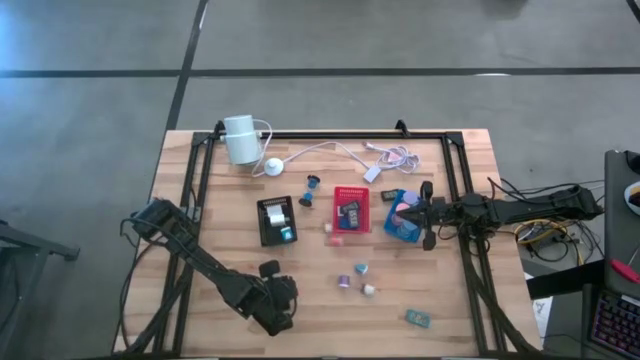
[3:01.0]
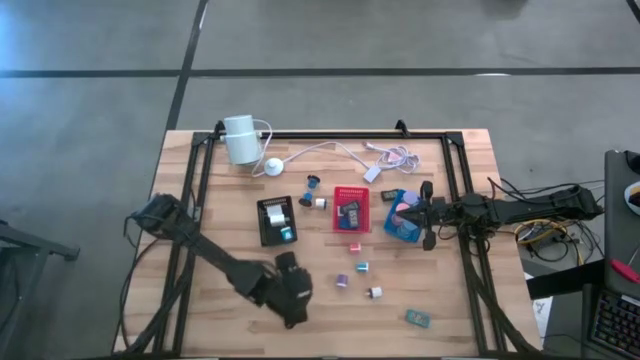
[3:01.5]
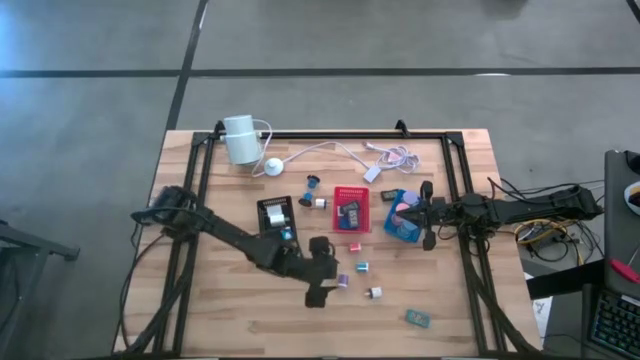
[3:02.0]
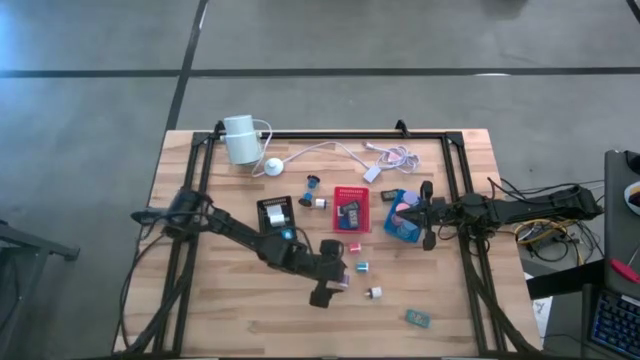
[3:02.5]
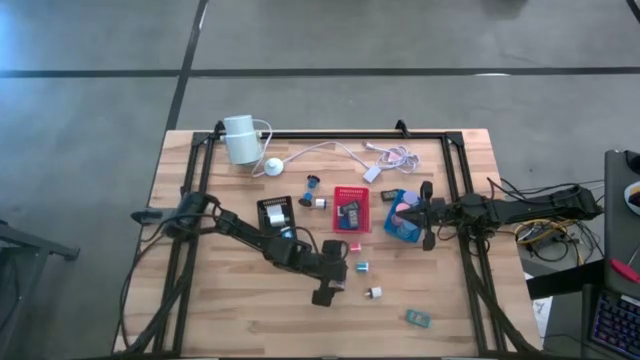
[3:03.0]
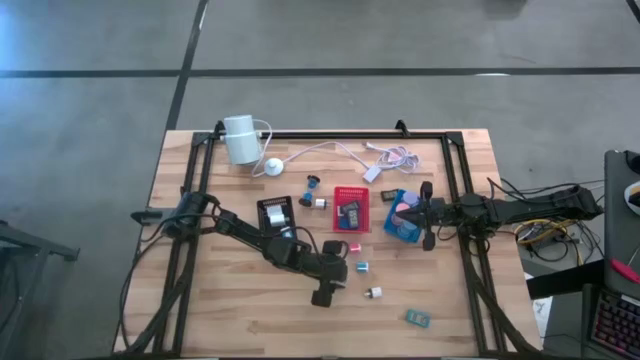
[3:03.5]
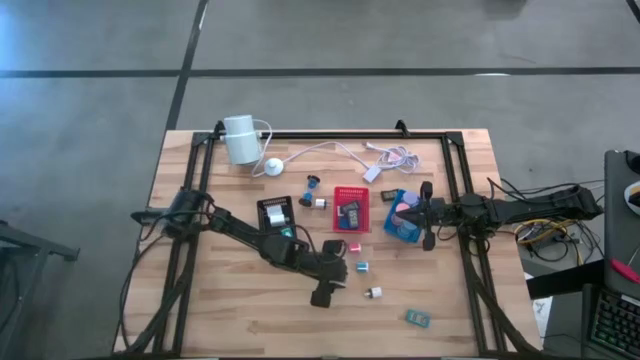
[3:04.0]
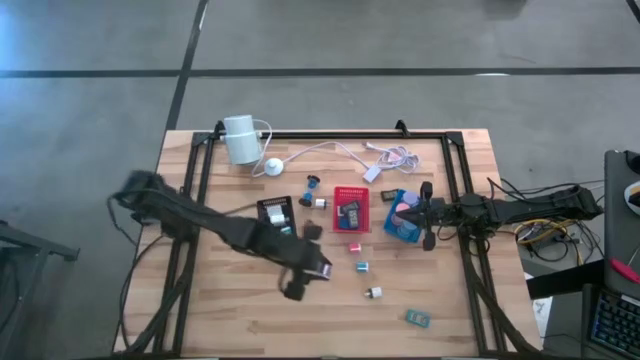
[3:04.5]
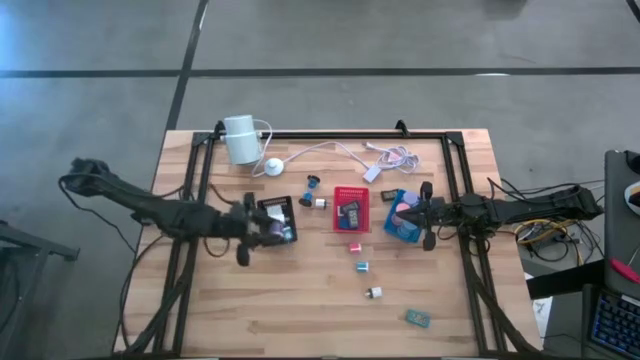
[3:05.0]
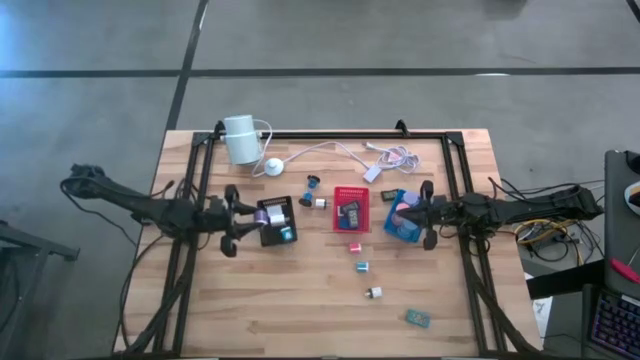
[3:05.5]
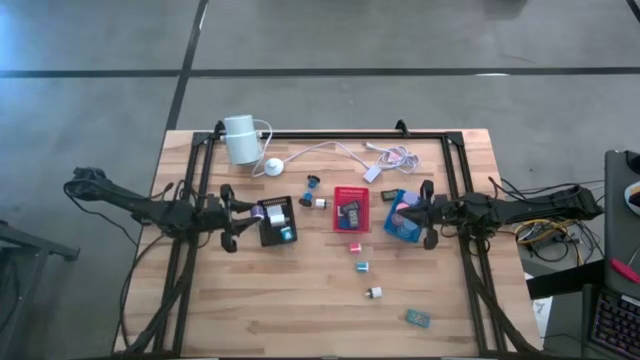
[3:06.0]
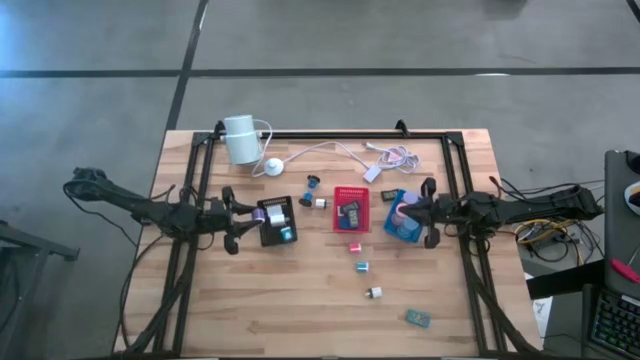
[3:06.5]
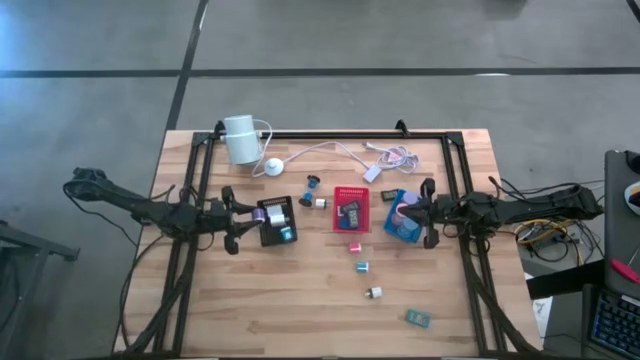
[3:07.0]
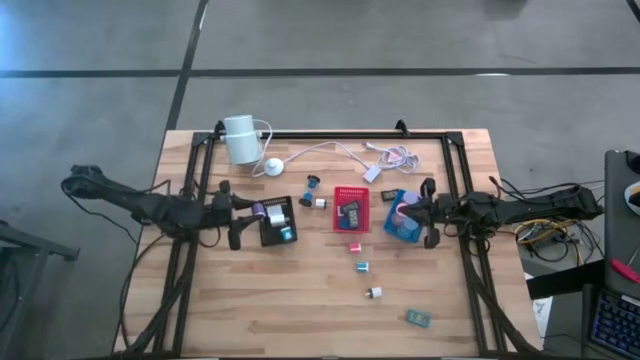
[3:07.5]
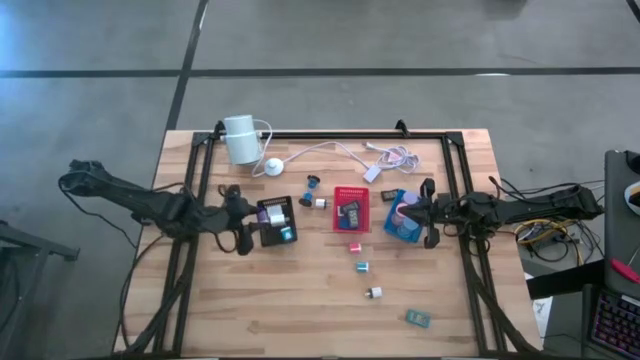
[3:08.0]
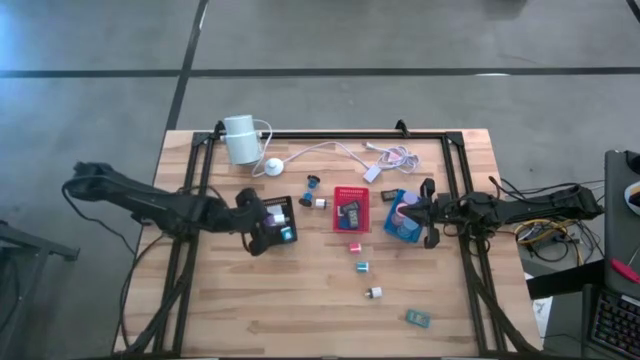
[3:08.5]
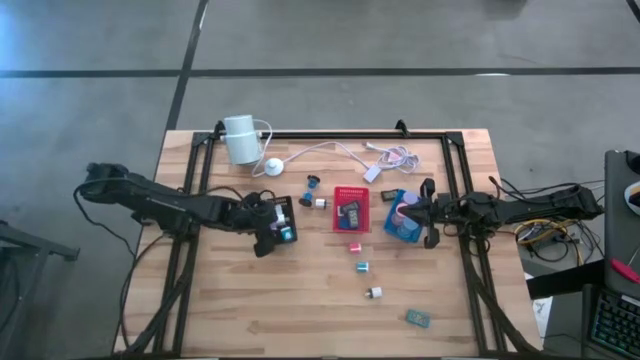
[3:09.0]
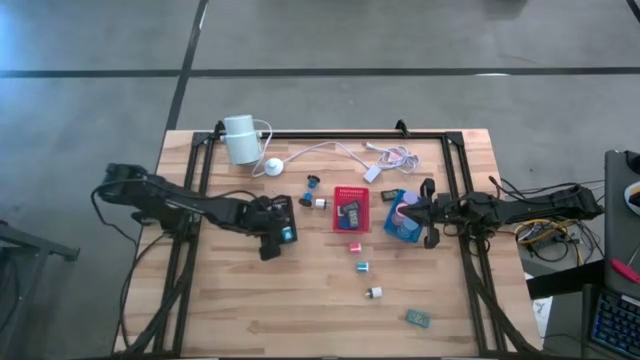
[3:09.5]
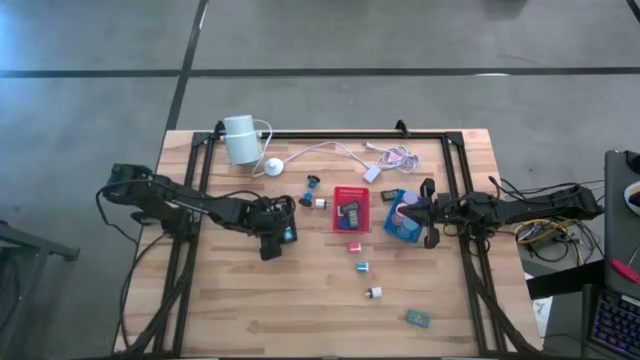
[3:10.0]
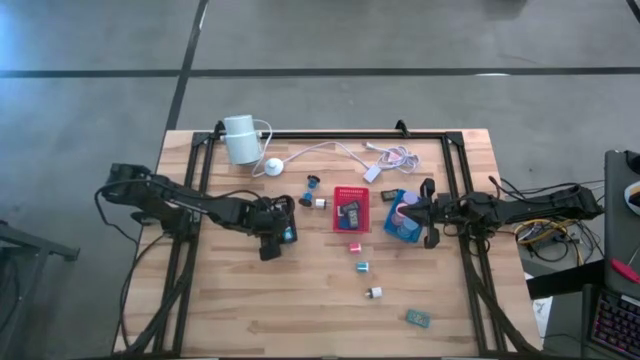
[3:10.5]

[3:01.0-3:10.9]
Task: Pick & Place Office items
Put the purple charger adapter into the black bin

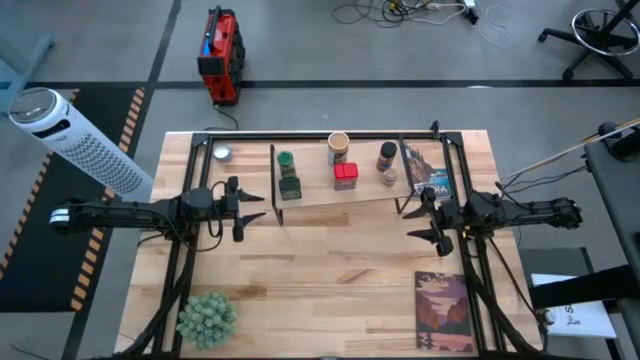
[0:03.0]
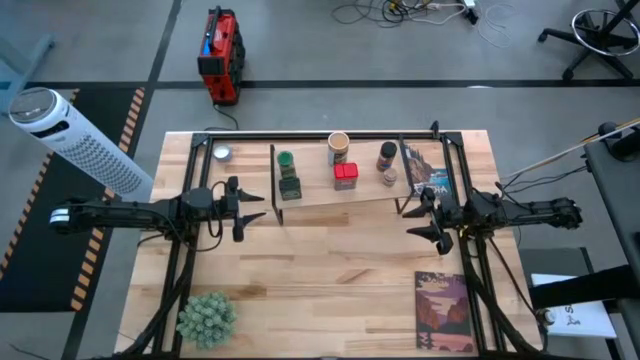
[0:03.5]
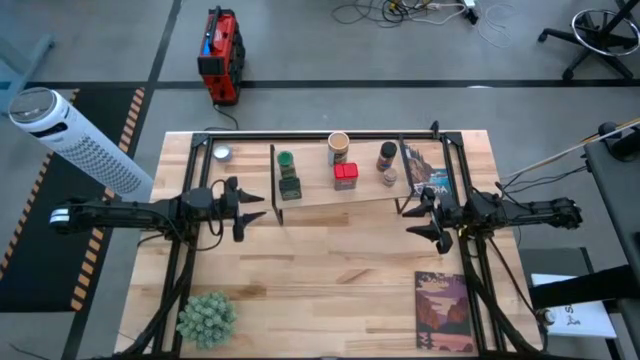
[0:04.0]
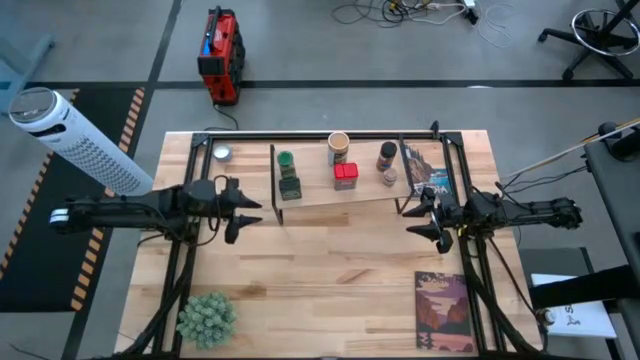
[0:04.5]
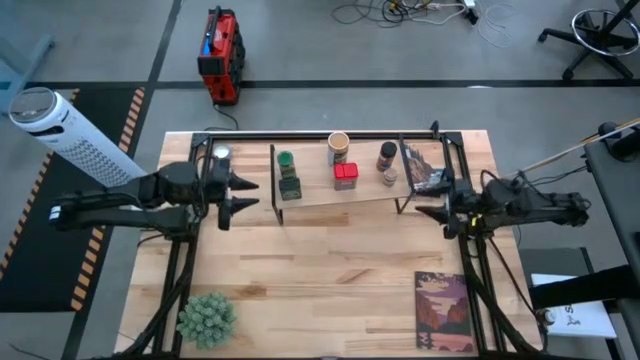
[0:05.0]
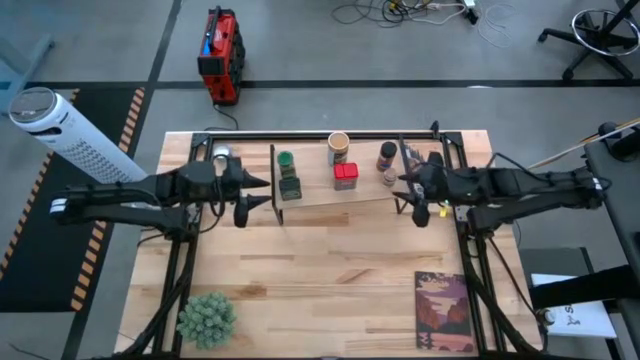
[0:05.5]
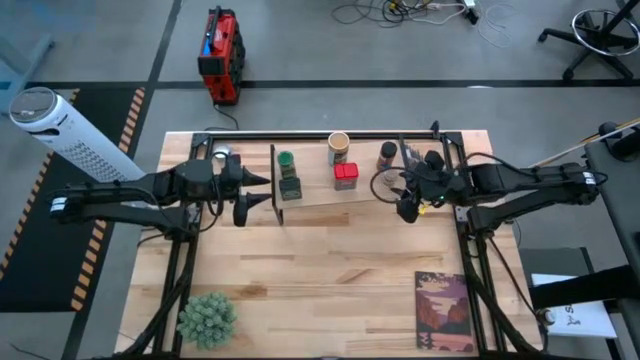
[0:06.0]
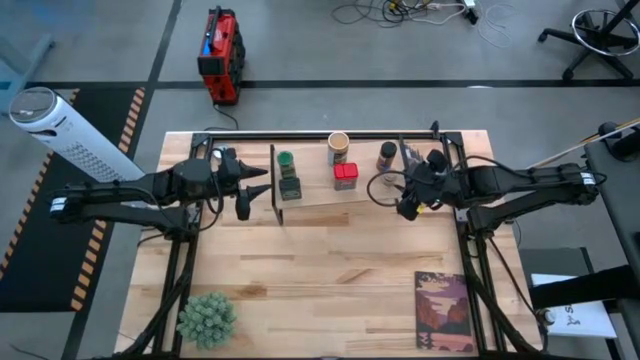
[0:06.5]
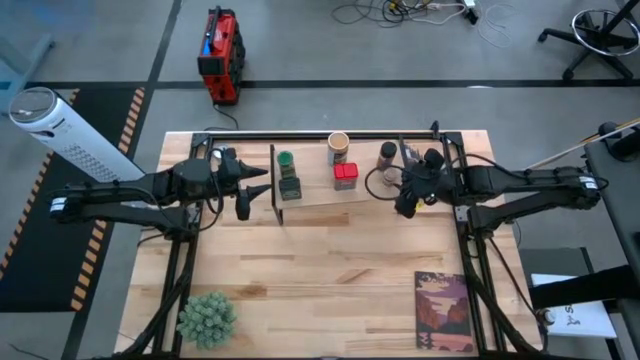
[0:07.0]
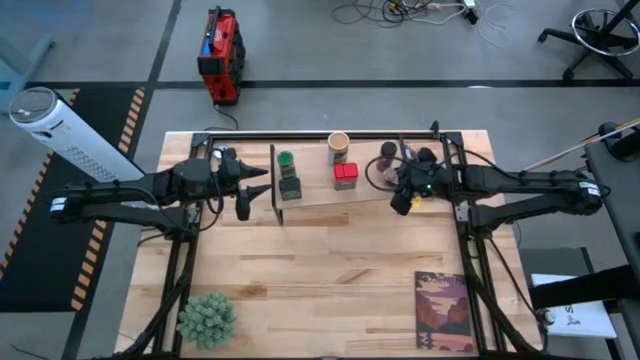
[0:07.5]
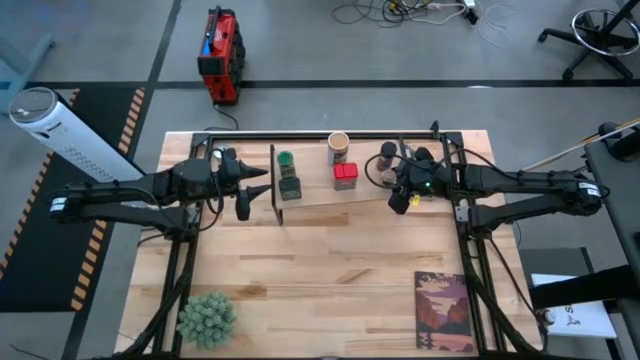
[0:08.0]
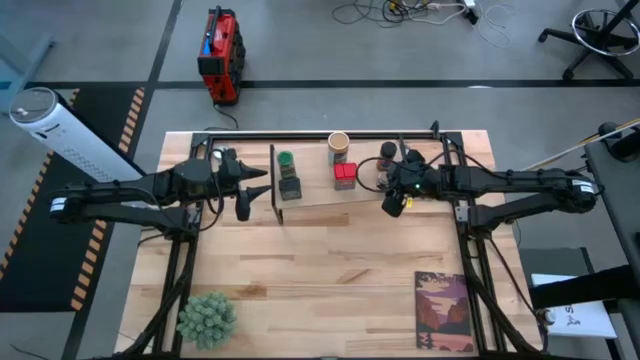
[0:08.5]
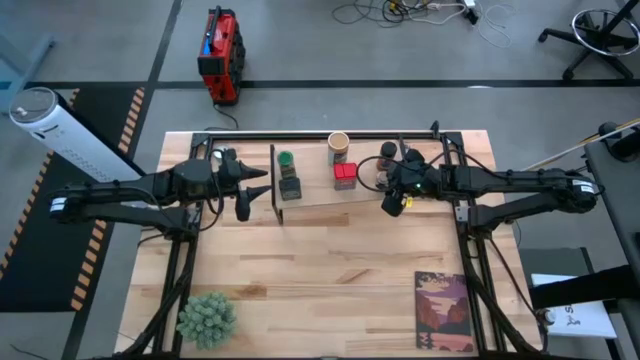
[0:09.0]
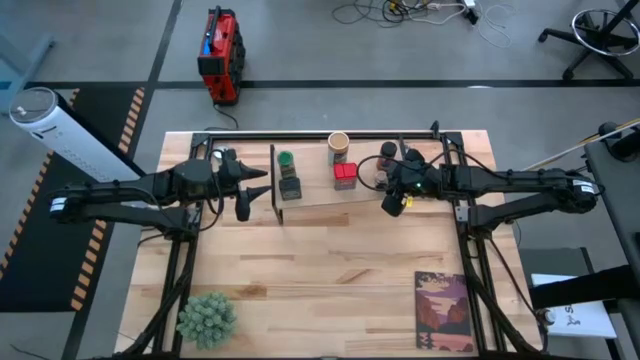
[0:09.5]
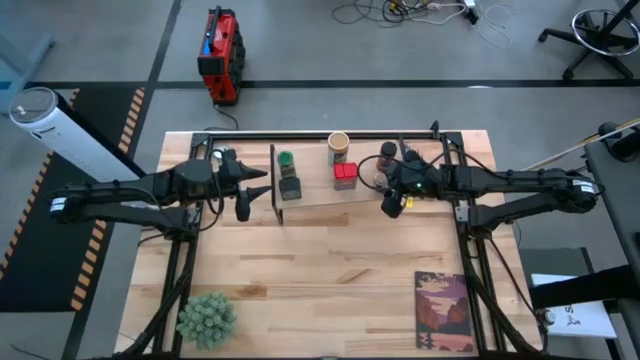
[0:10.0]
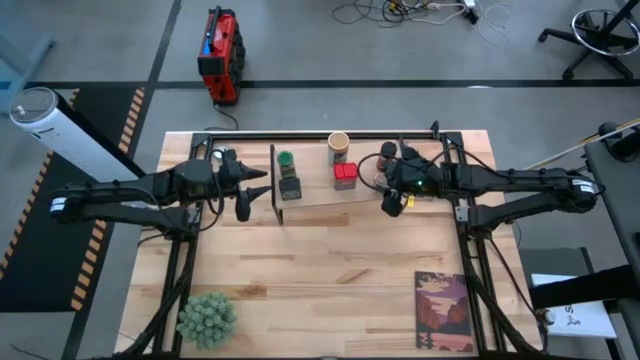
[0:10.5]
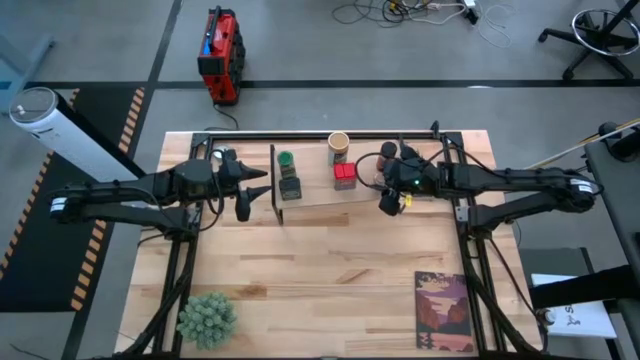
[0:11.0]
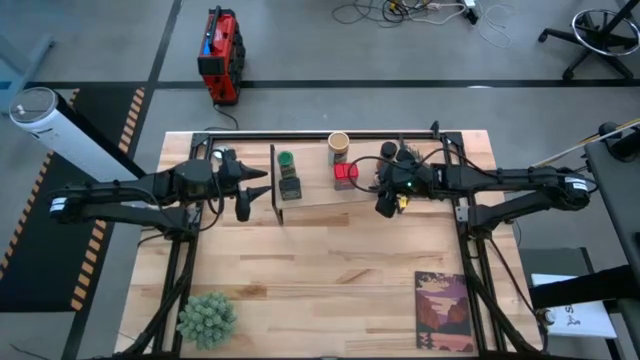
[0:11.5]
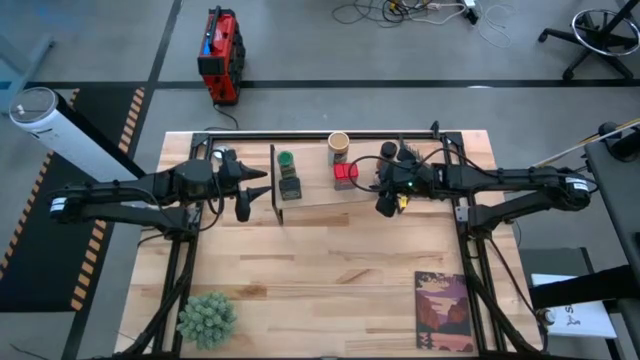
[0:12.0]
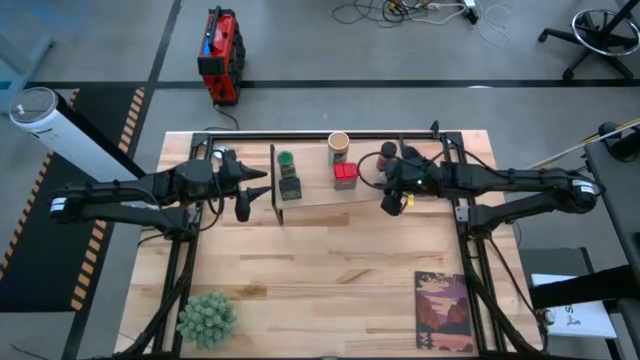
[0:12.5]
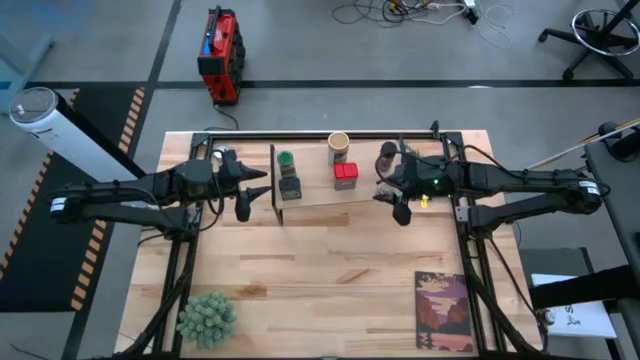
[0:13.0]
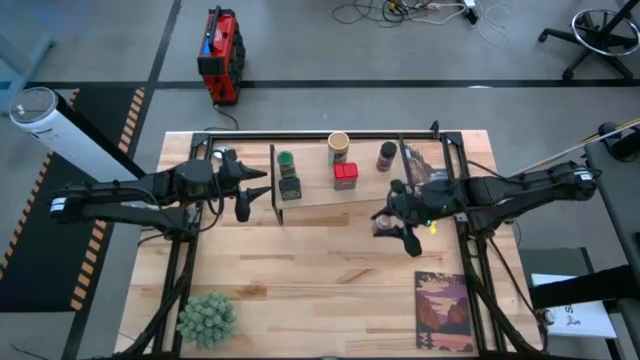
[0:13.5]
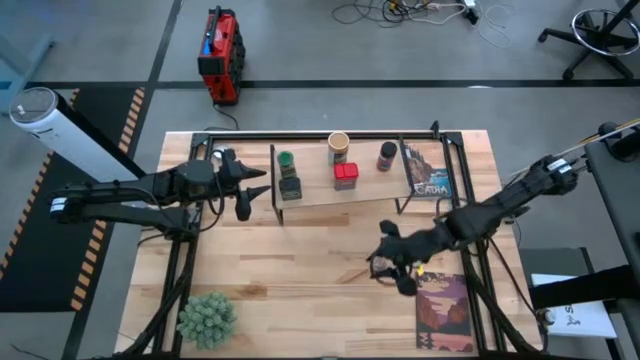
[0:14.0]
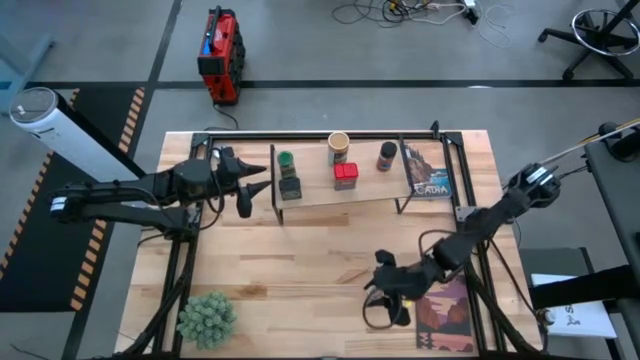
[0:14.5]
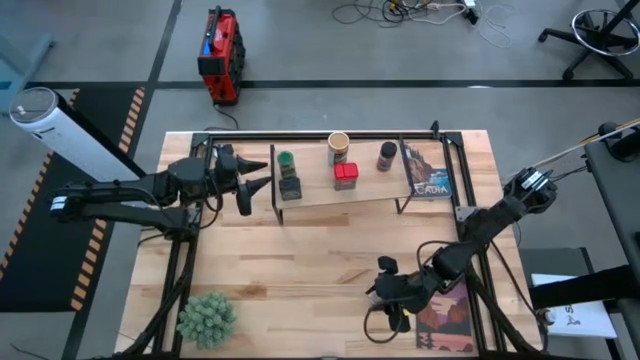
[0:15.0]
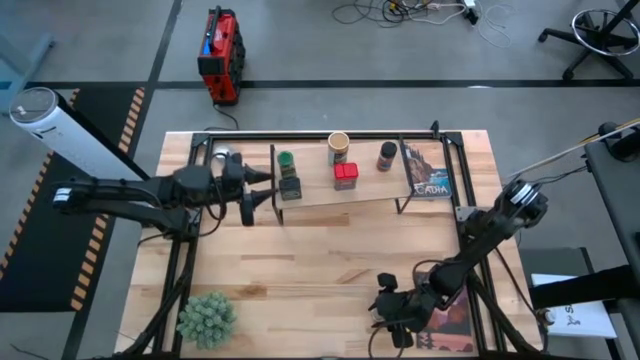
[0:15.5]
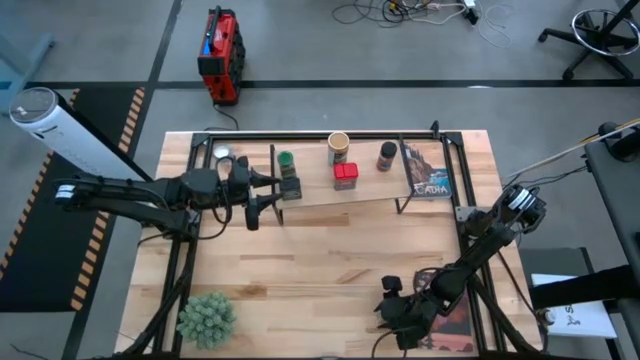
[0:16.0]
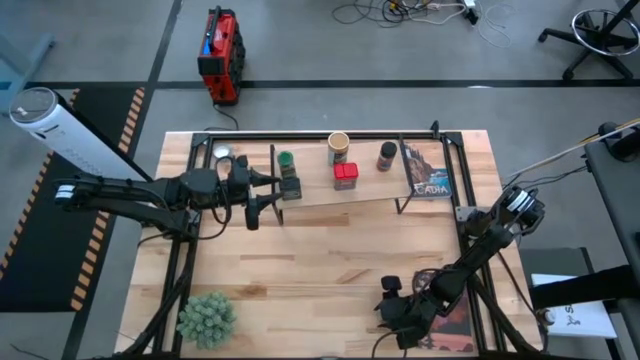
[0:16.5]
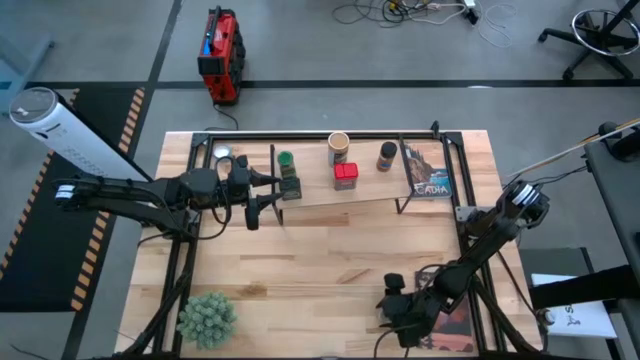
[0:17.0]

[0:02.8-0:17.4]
Task: Shelf spices
Remove the brown seasoning bottle from the shelf
